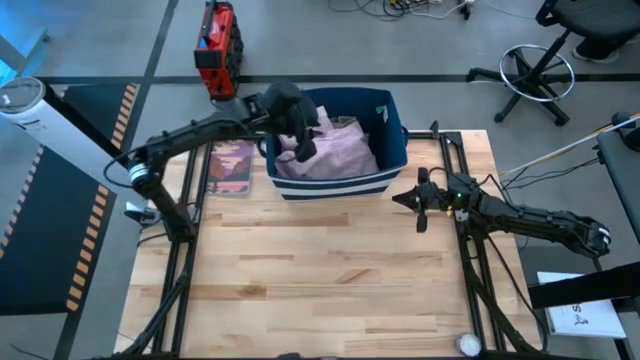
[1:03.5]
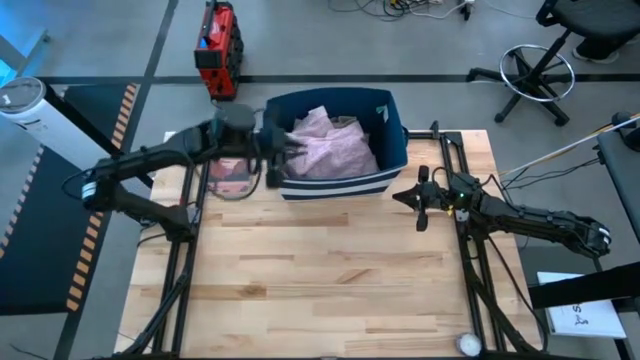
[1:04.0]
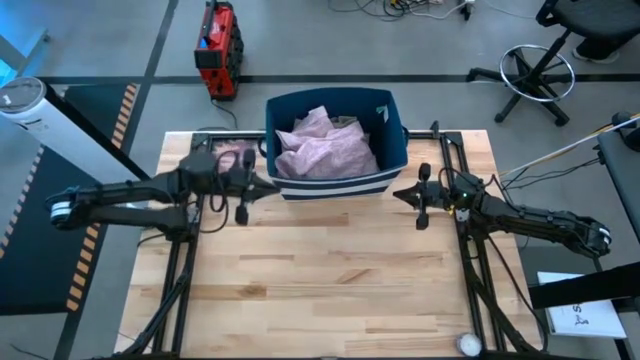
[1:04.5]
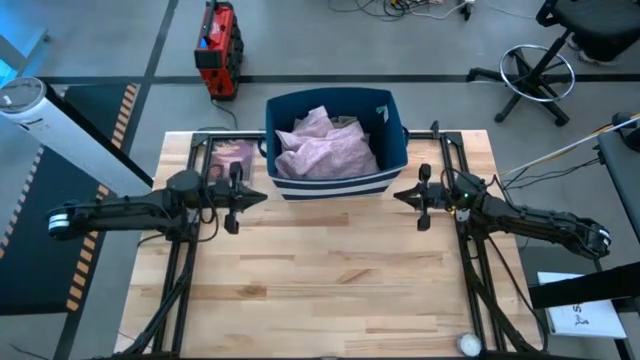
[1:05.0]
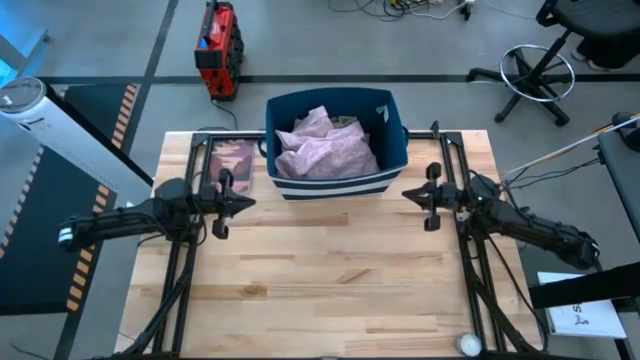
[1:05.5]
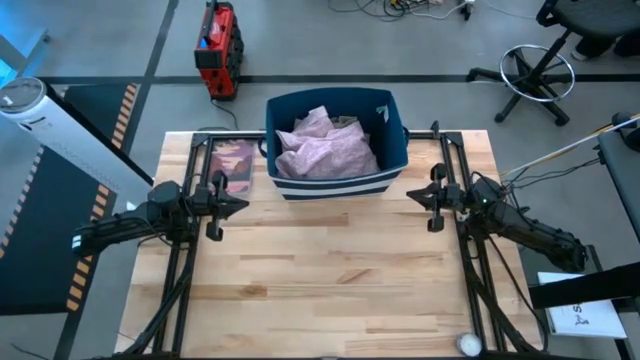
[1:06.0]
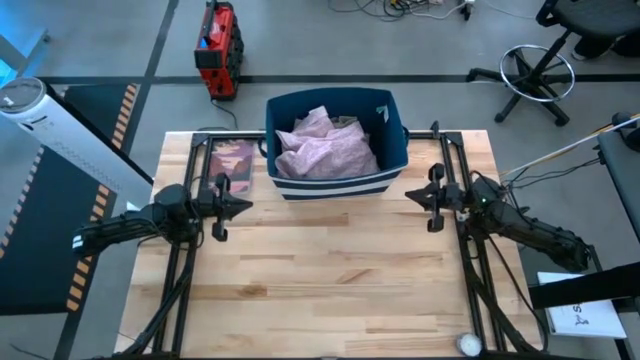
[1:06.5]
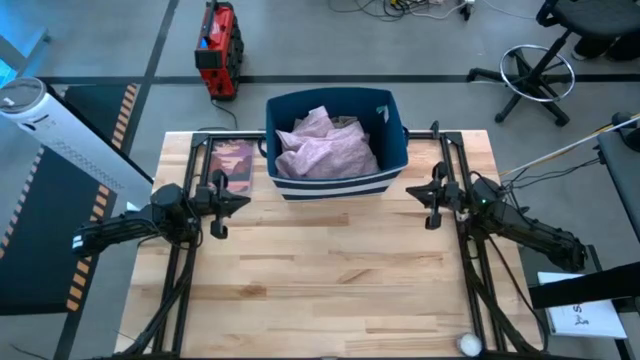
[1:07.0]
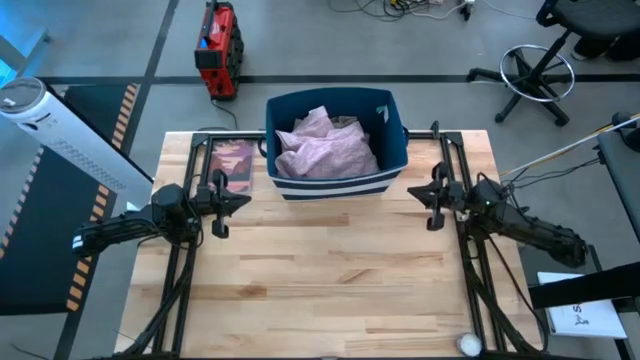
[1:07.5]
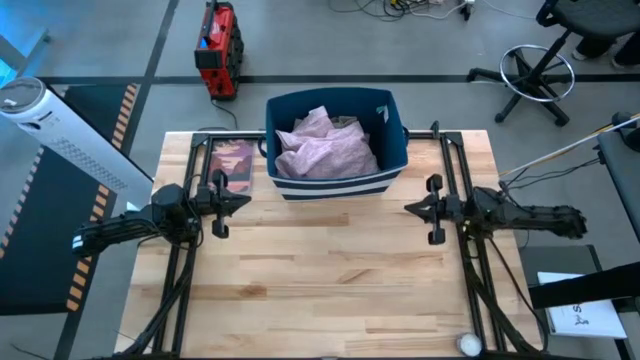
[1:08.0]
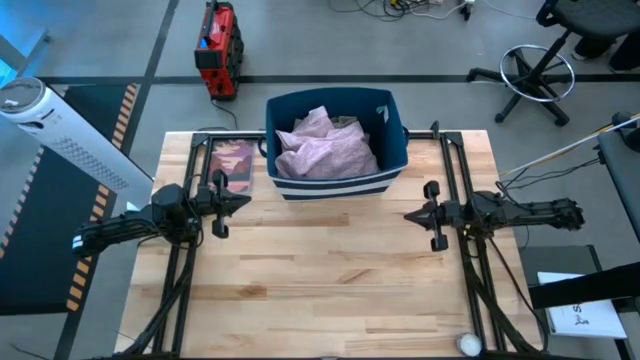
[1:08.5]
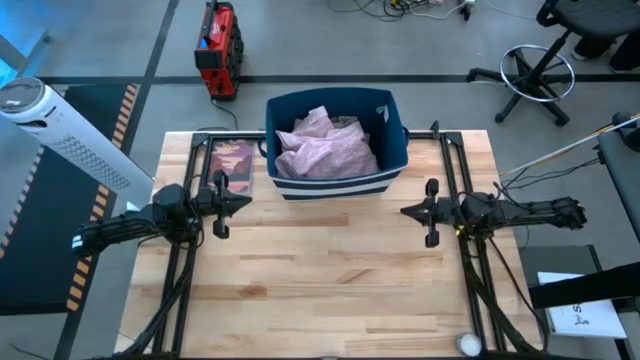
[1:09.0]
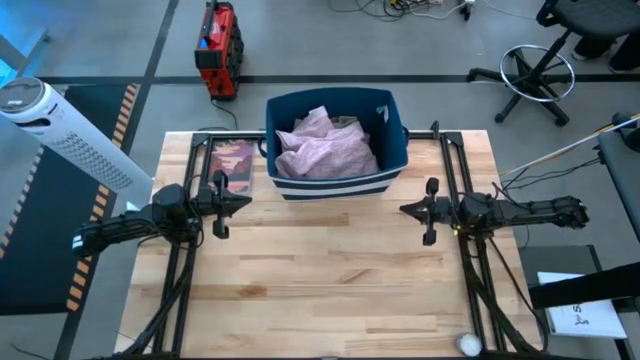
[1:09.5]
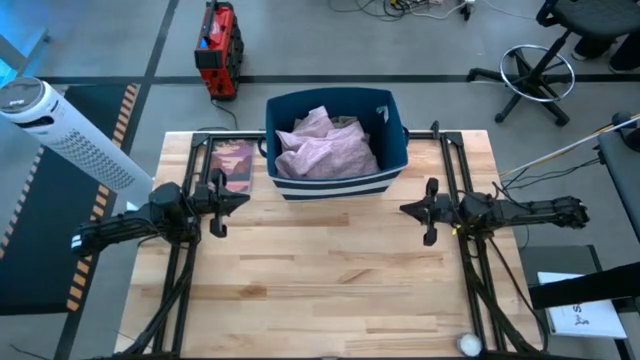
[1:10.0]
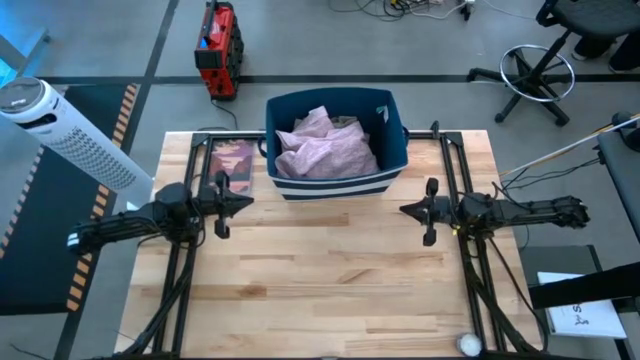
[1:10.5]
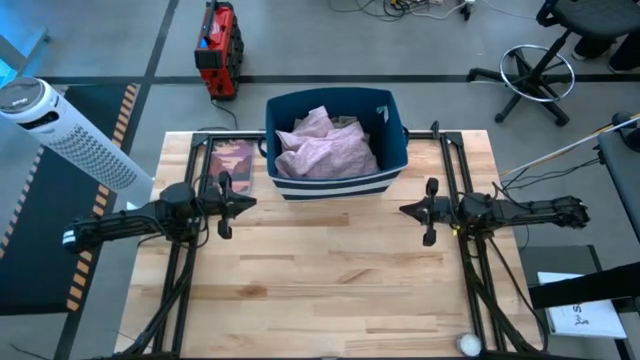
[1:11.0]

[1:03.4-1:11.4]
Task: Sort clothes
Return to Home Position

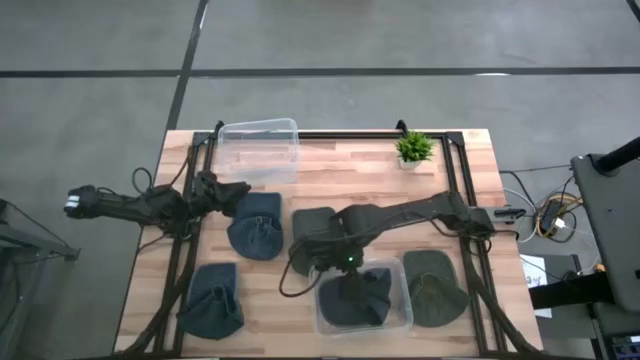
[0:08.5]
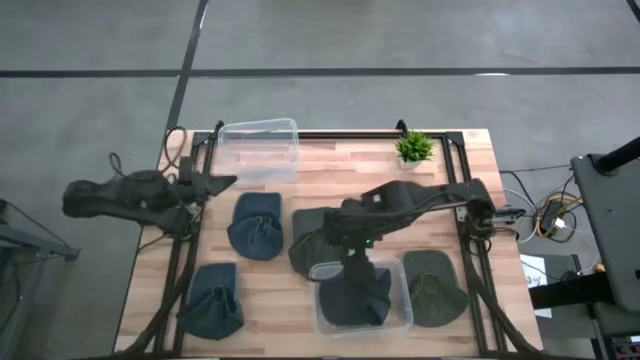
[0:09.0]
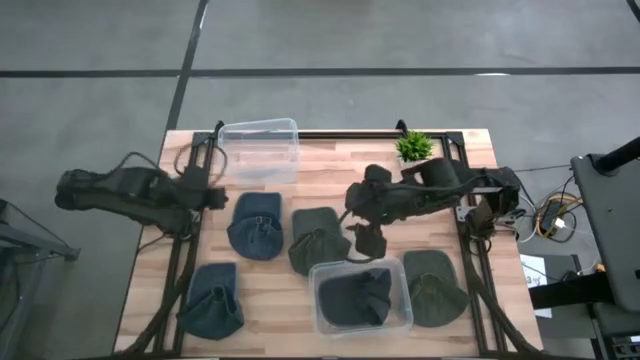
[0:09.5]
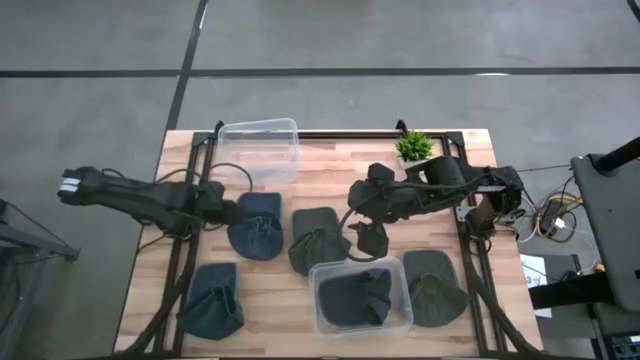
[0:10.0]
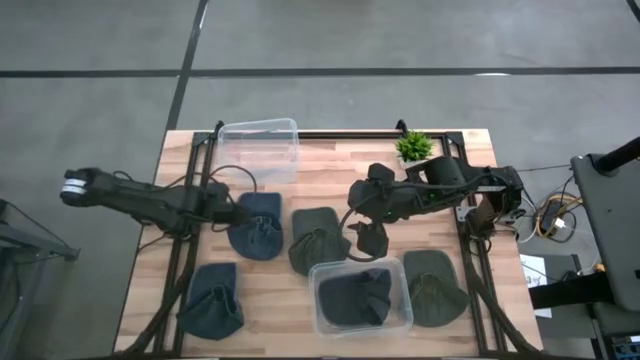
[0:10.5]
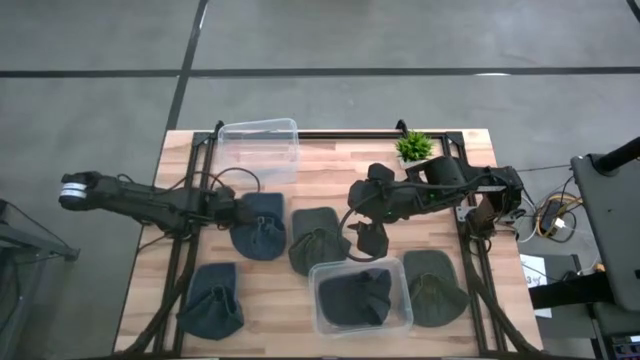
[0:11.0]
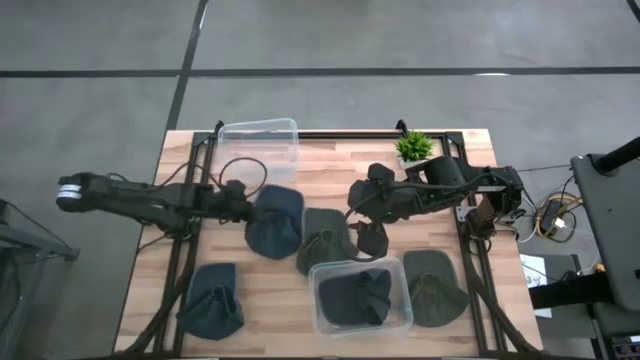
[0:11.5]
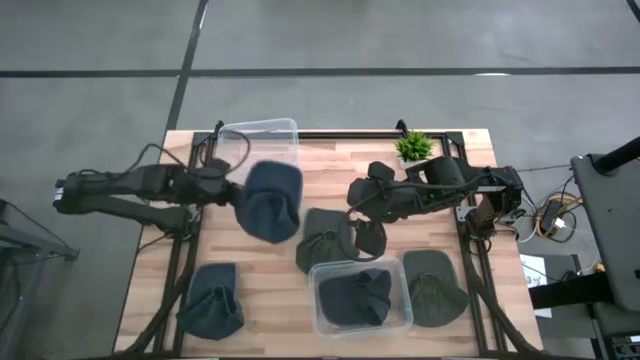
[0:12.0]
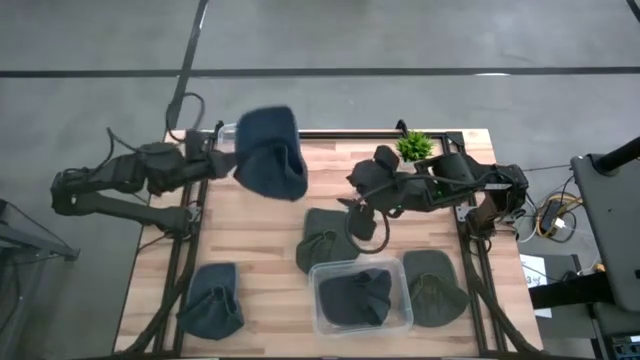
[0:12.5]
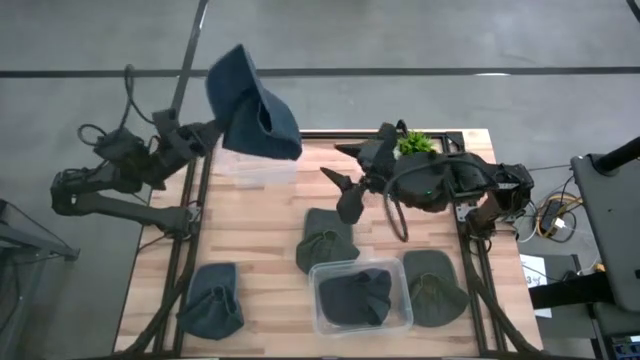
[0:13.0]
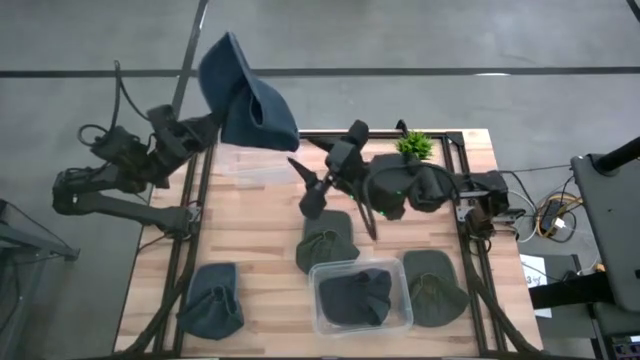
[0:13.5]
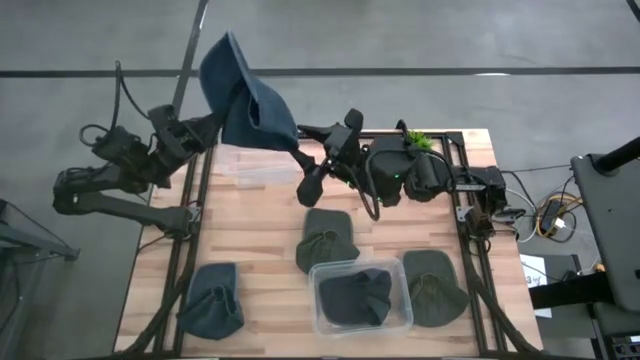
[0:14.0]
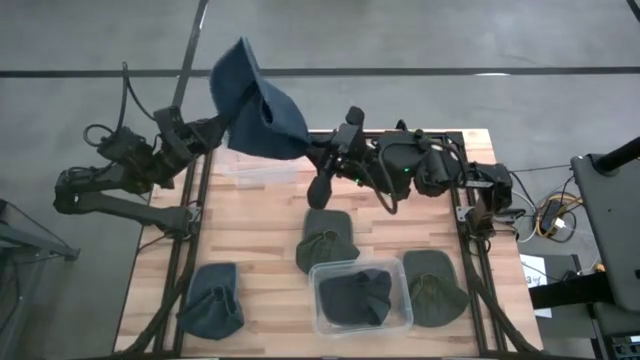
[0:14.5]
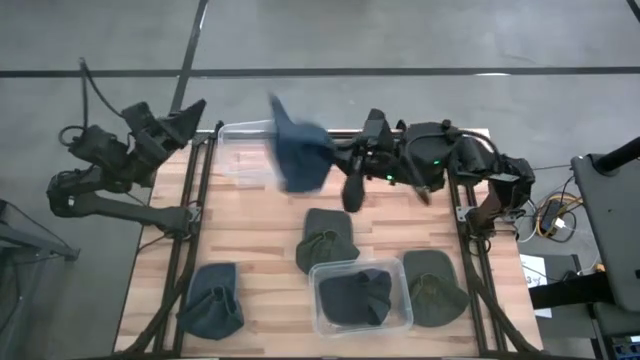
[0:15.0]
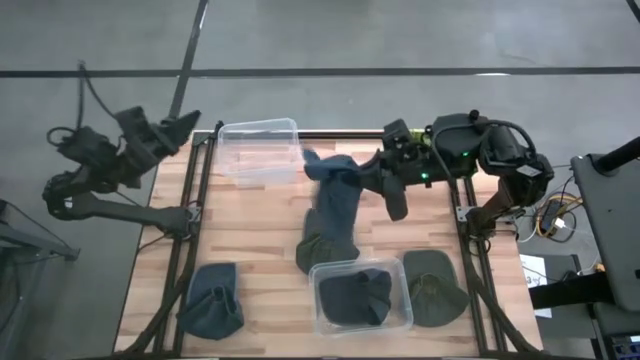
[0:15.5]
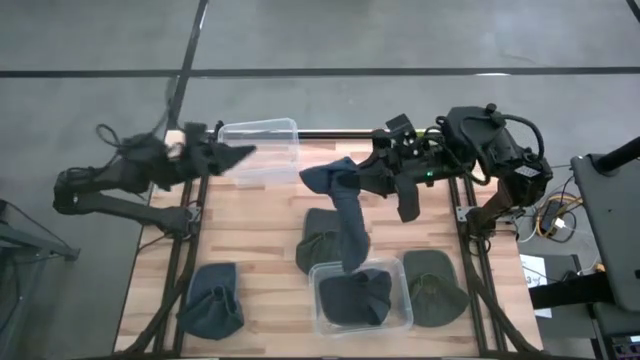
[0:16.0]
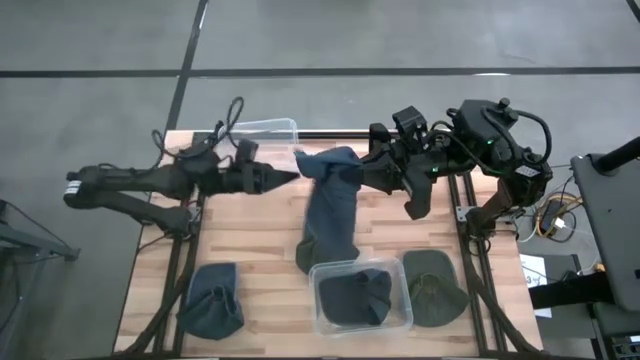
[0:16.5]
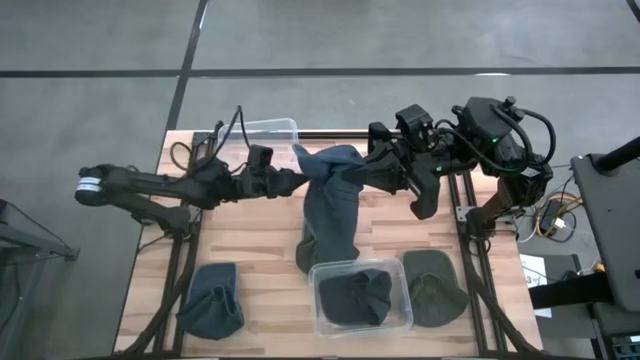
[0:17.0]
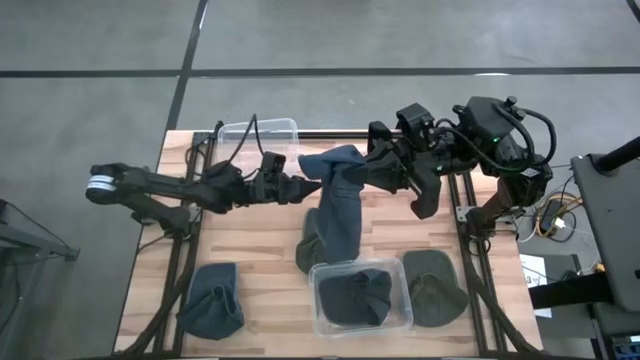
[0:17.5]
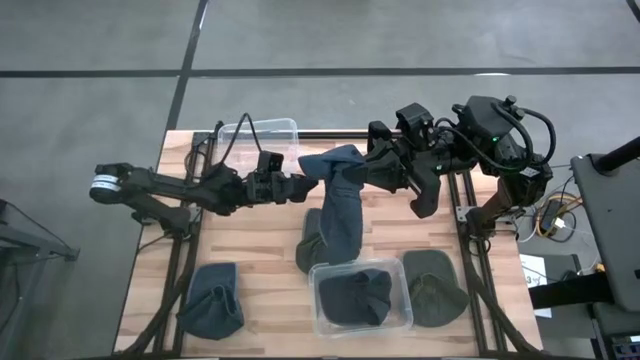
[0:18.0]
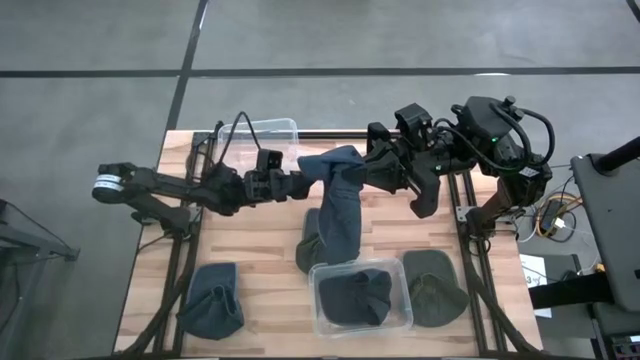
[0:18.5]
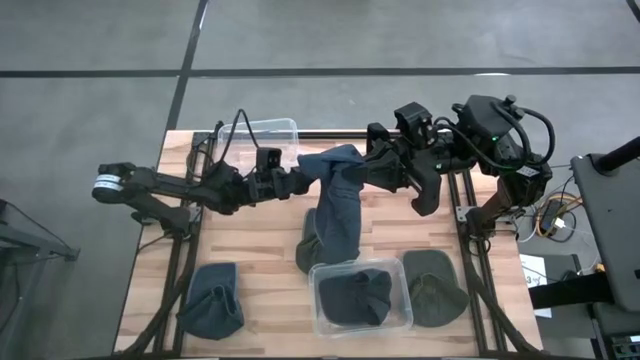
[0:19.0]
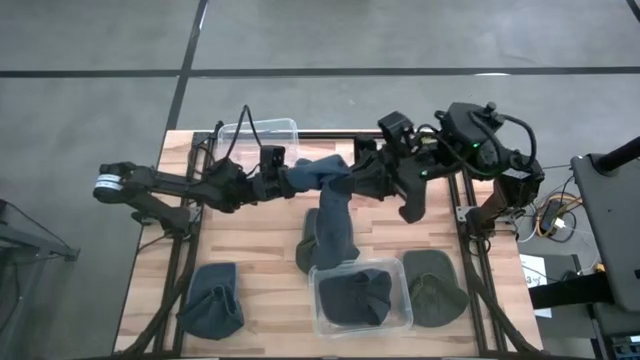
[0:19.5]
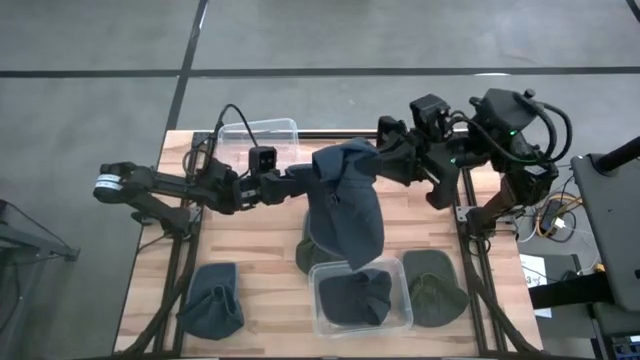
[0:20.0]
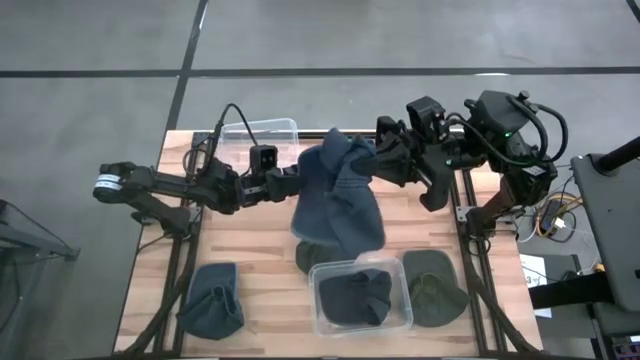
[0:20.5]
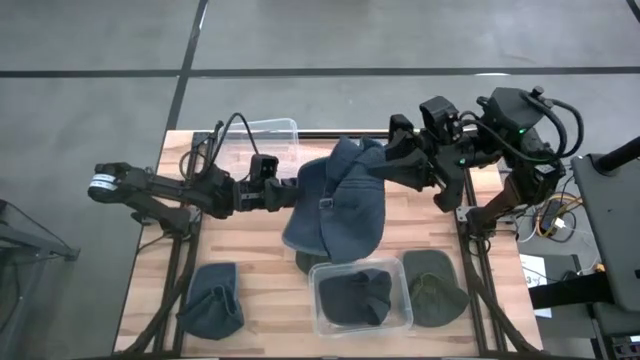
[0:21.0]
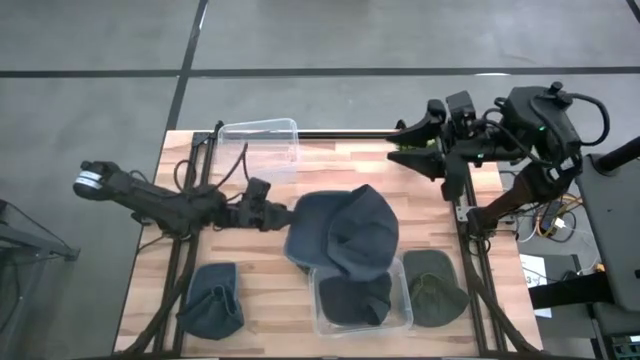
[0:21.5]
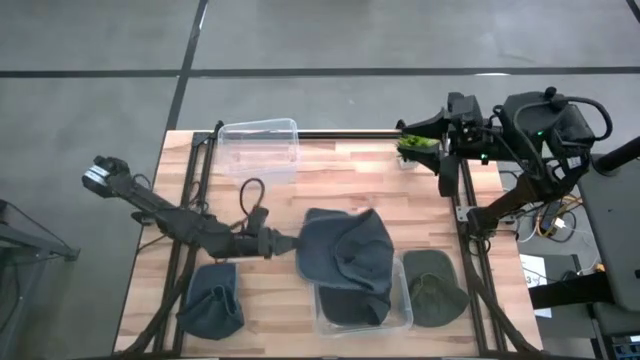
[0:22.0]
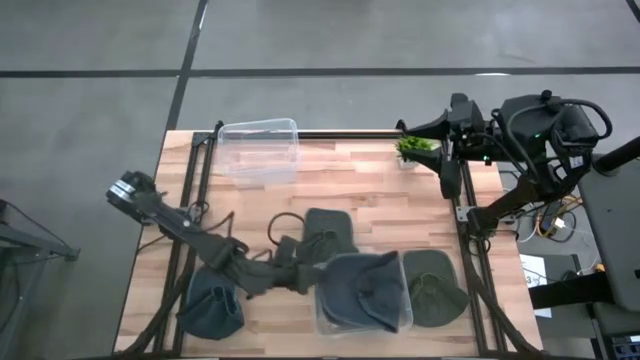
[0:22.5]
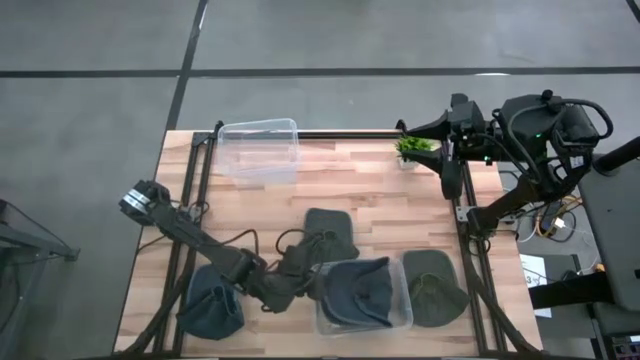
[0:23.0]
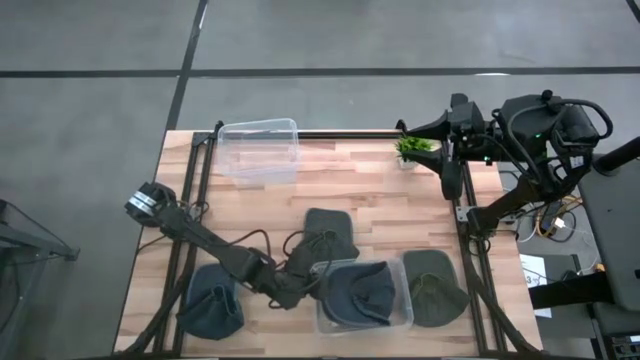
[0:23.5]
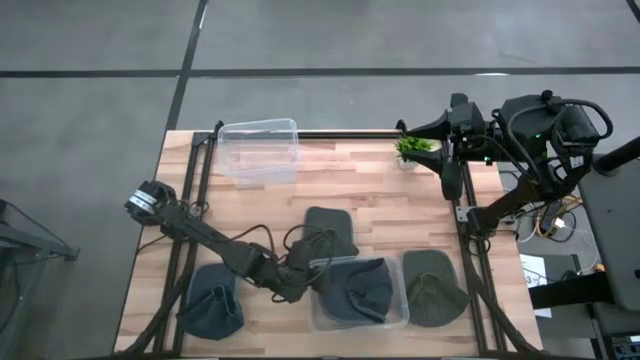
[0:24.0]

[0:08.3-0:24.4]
Task: Pick & Place hat
Put the top blue cap into the bottom transparent bin
